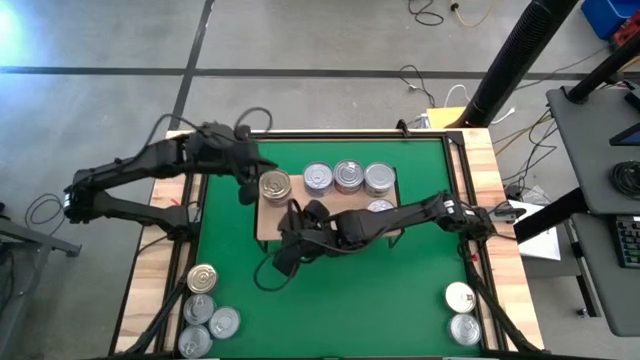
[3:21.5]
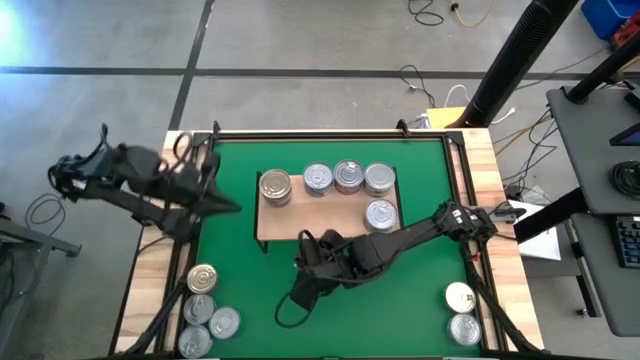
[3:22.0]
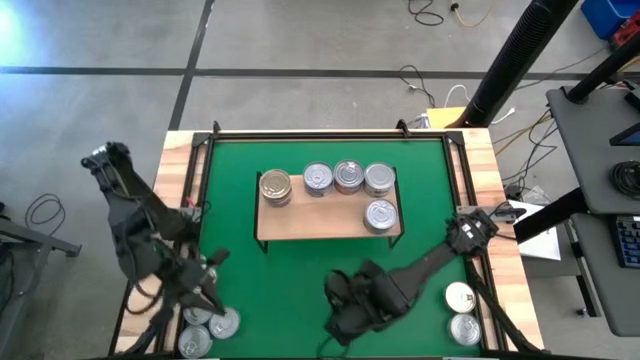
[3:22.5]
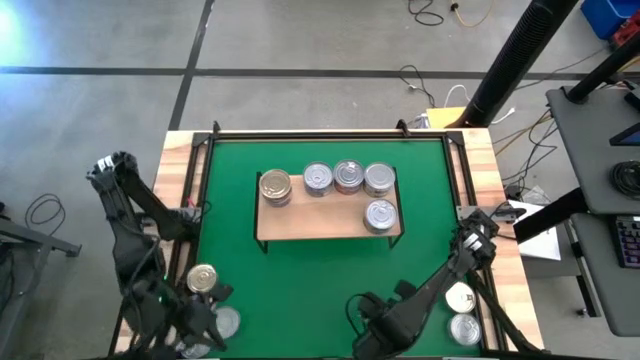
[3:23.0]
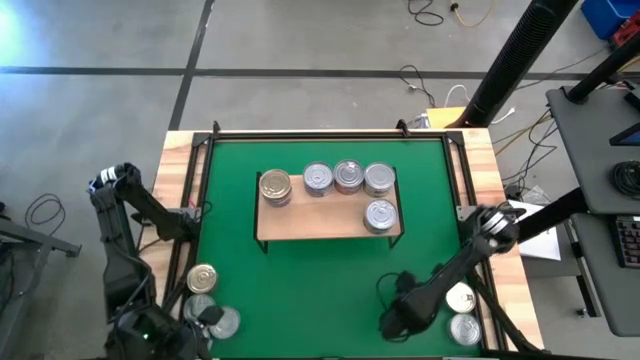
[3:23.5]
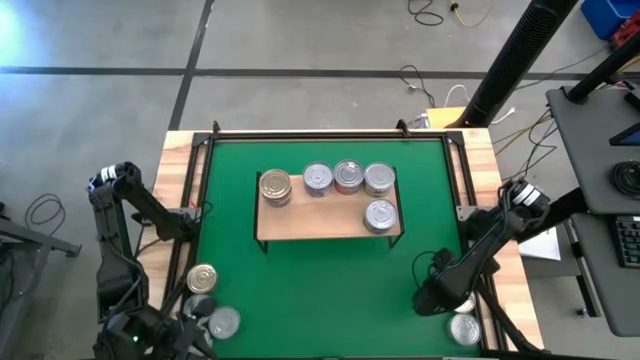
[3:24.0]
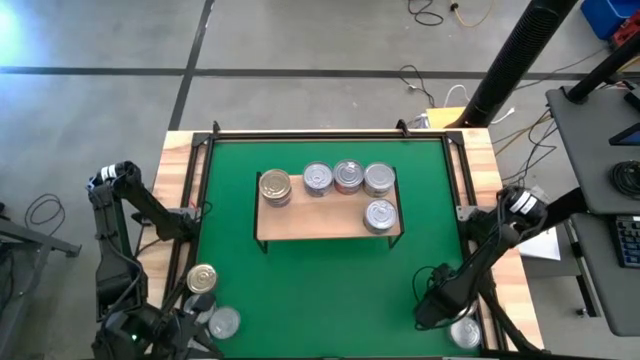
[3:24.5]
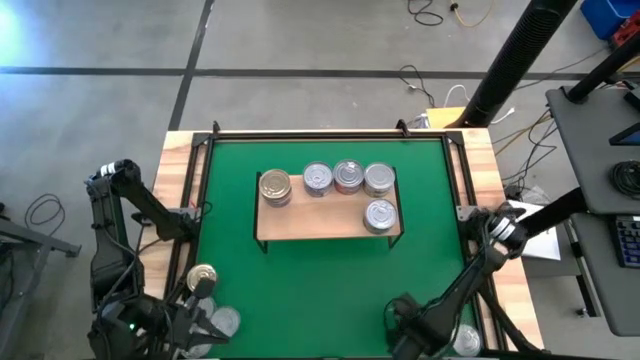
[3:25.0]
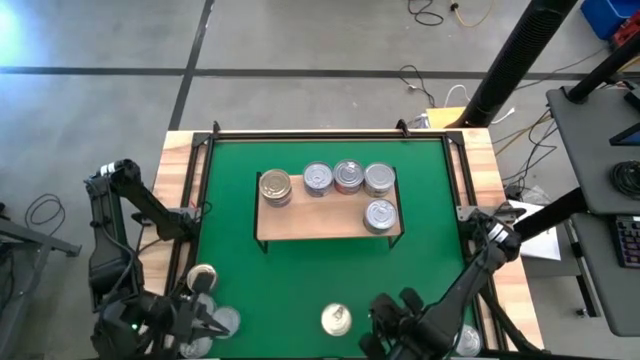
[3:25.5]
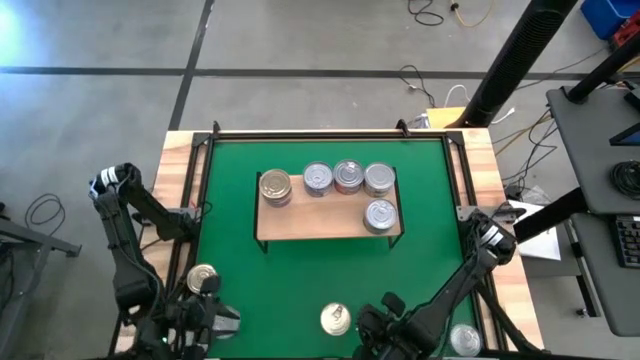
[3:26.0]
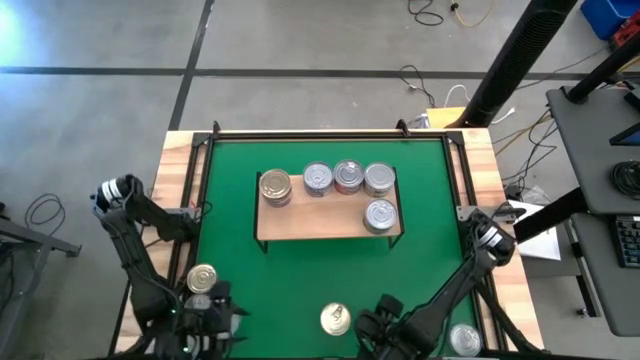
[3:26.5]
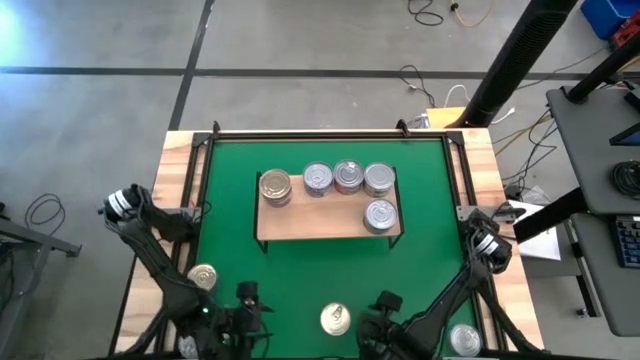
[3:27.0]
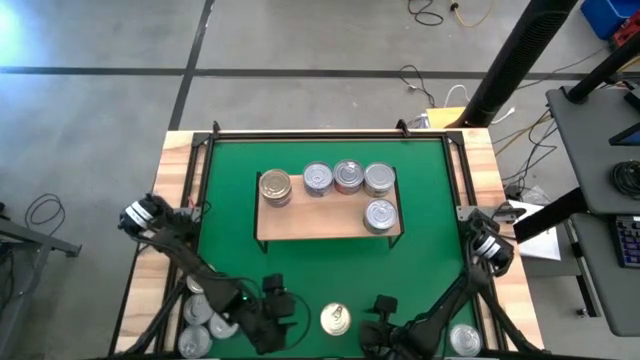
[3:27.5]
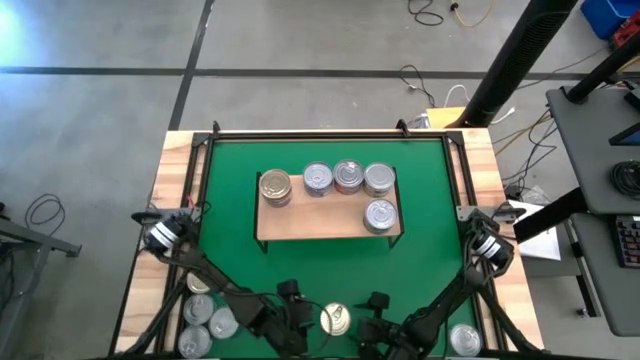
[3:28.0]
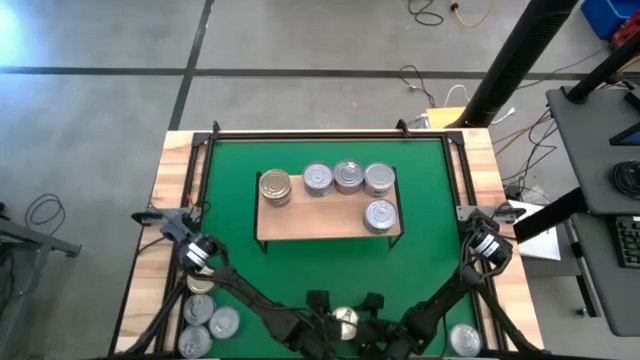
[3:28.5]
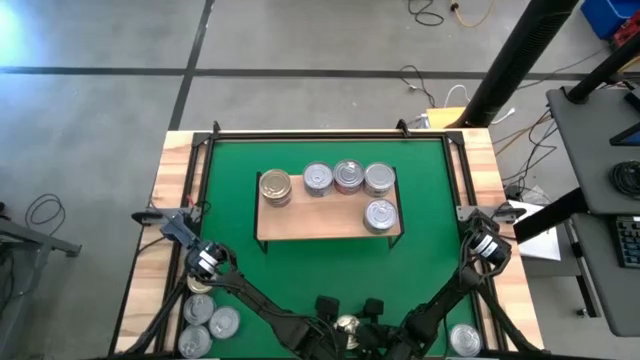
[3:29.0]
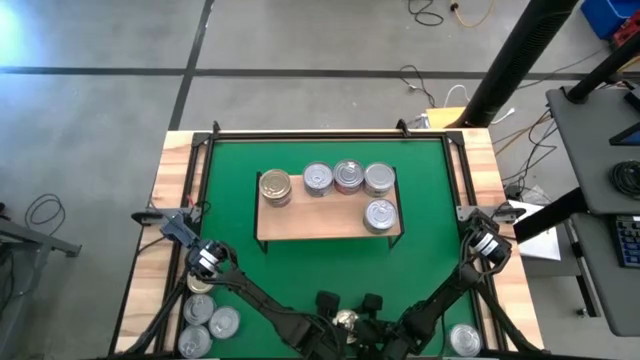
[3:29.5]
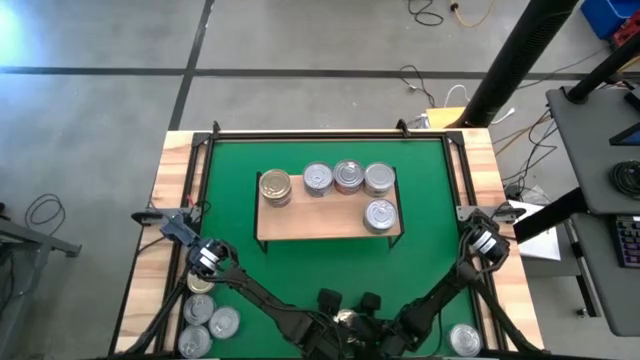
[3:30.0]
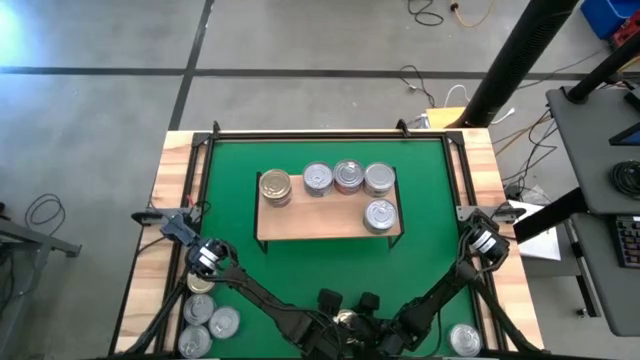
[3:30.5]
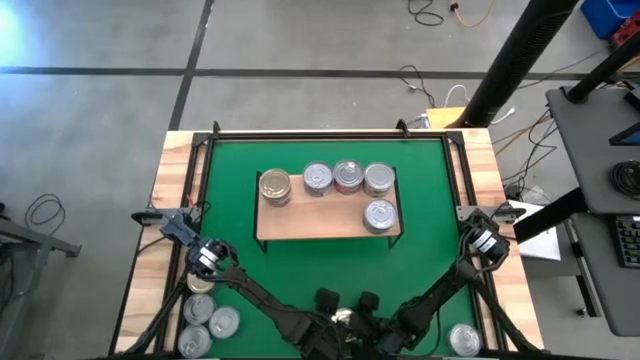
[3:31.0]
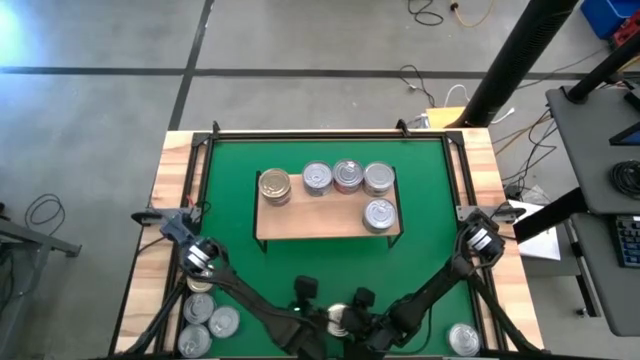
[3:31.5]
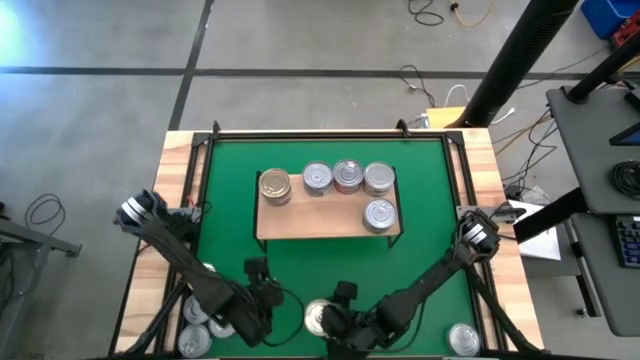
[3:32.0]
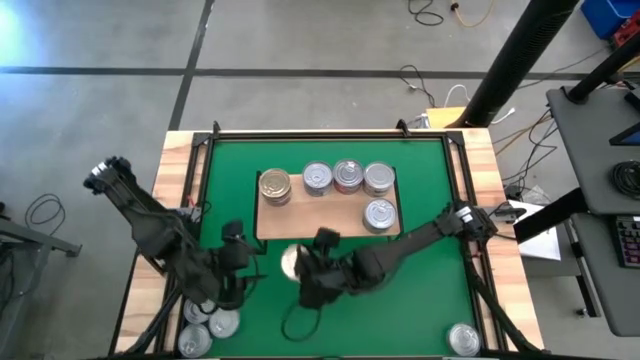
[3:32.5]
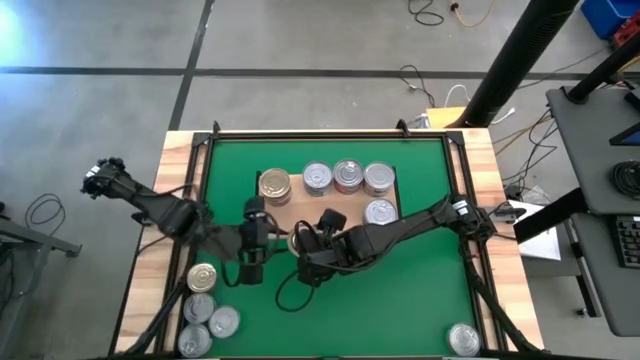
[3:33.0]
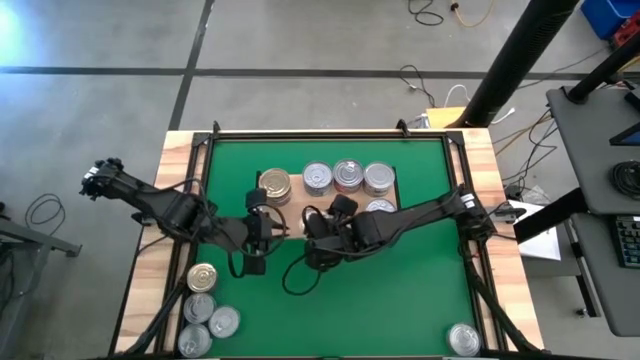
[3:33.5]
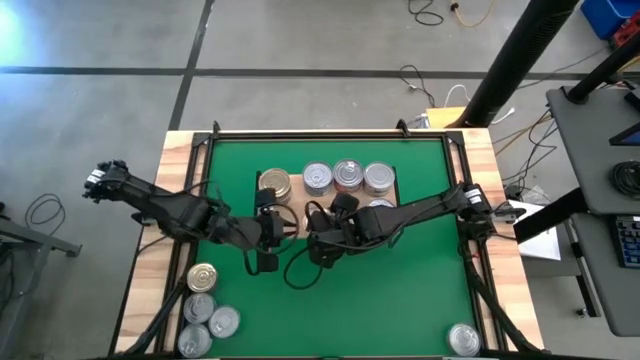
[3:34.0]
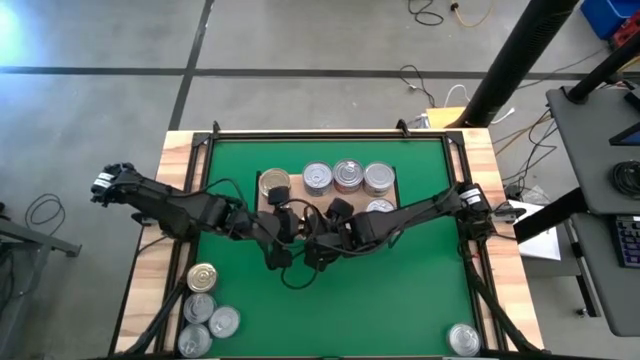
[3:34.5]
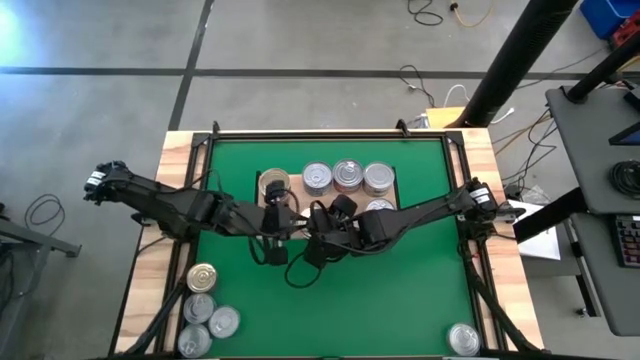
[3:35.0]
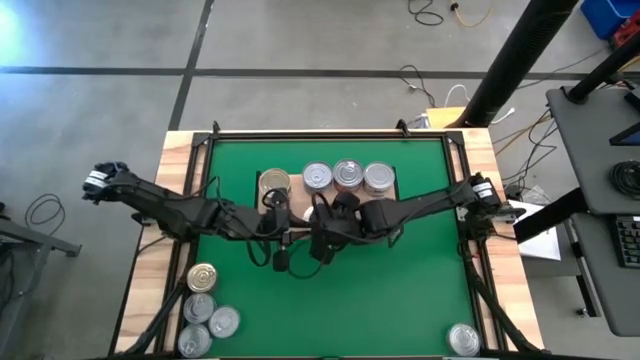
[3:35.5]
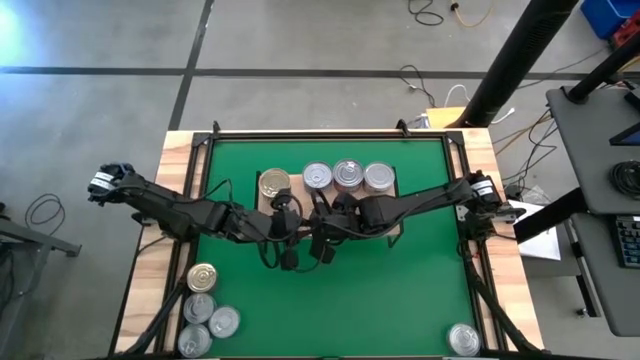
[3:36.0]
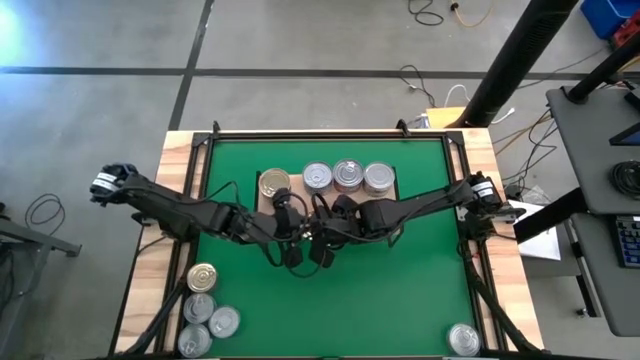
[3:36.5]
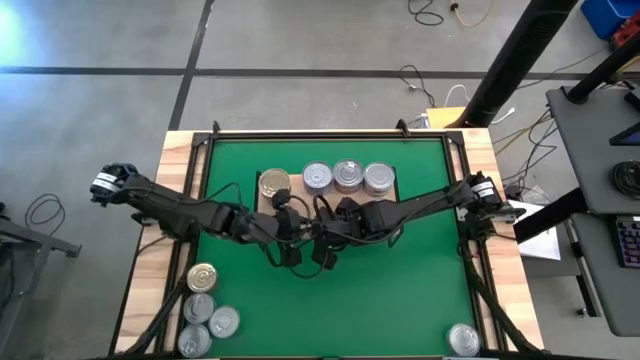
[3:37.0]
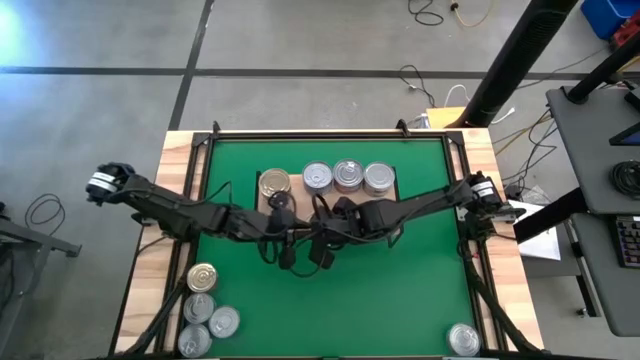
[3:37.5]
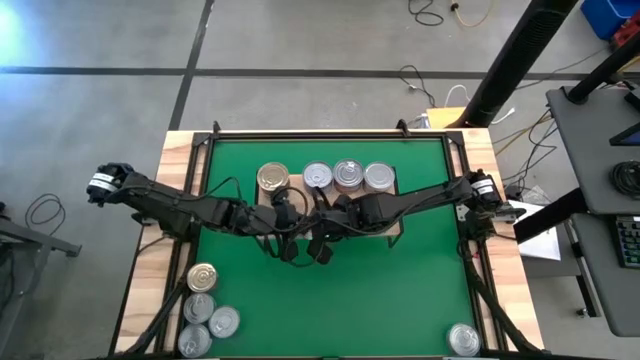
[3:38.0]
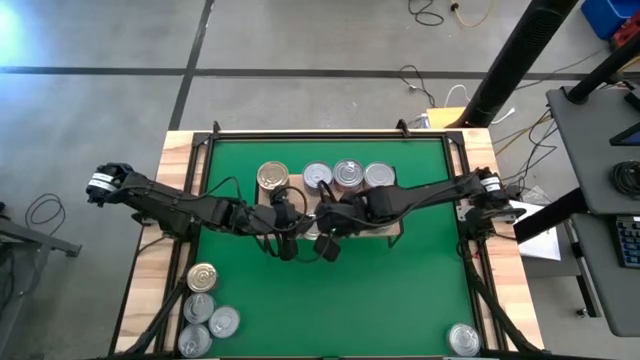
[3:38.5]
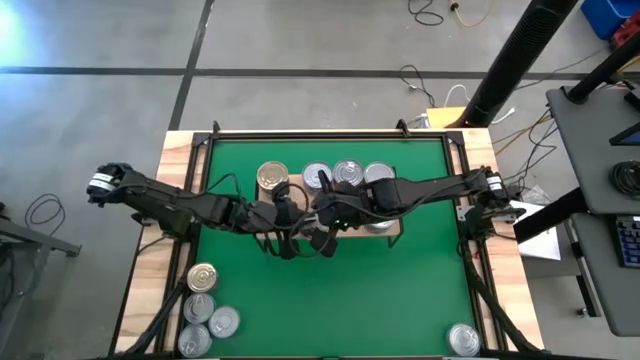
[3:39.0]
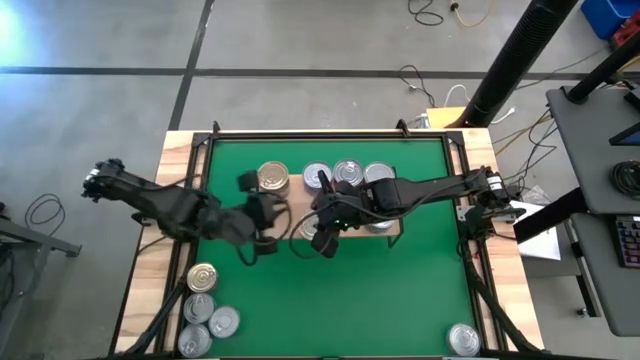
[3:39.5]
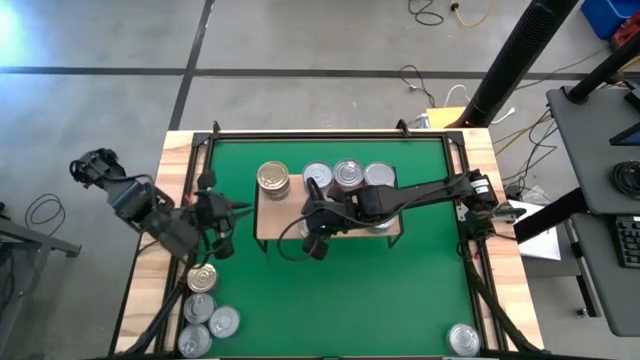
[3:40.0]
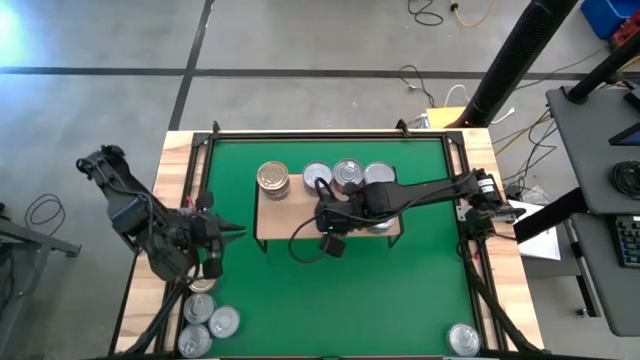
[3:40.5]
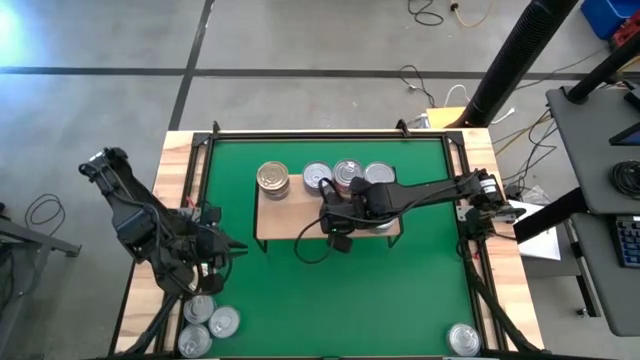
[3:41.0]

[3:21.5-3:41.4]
Task: Stack canned seafood by type on shelf
Put the right blue and pink tuna can on the shelf
